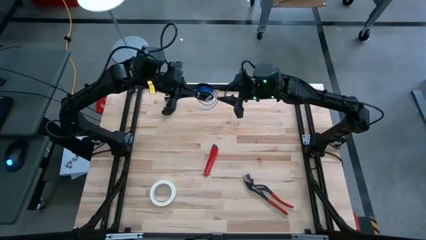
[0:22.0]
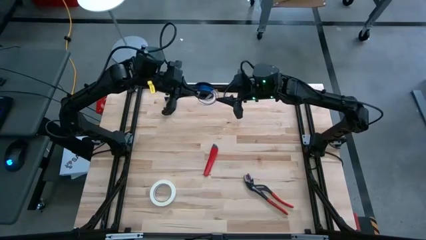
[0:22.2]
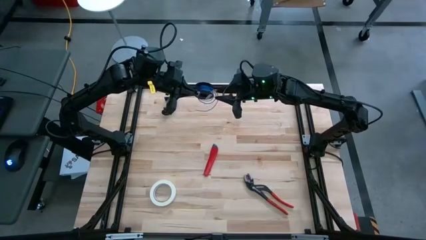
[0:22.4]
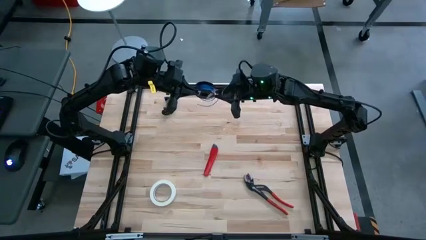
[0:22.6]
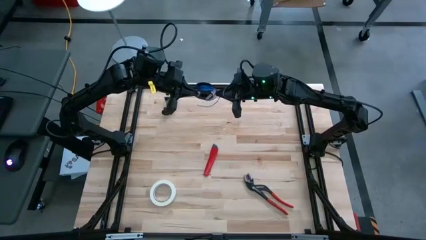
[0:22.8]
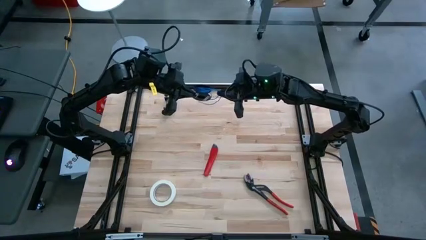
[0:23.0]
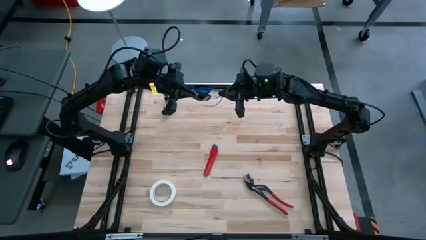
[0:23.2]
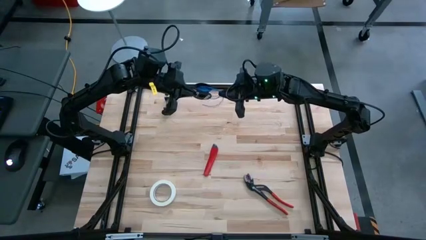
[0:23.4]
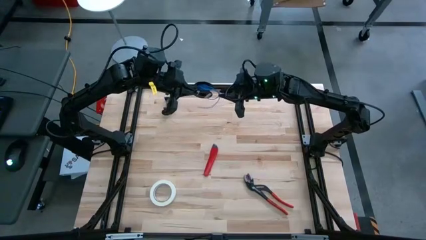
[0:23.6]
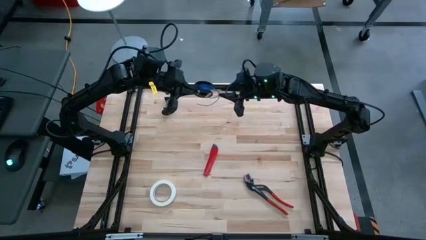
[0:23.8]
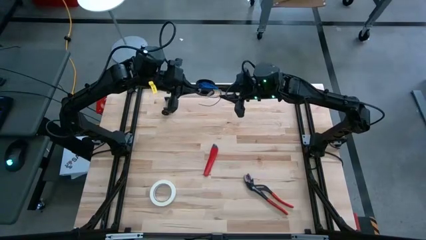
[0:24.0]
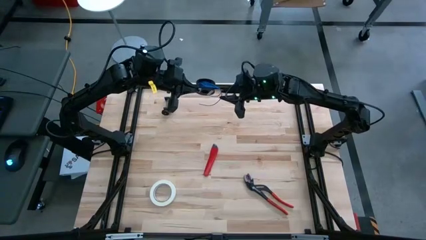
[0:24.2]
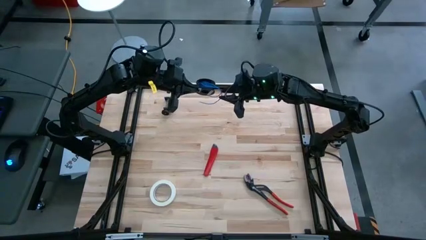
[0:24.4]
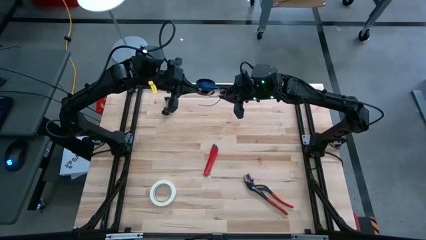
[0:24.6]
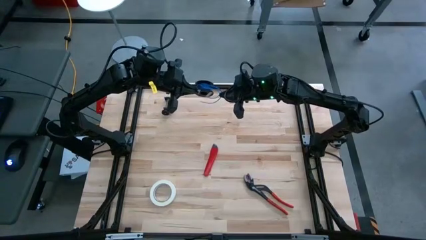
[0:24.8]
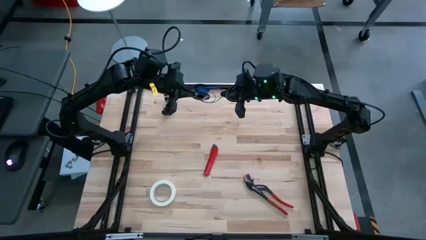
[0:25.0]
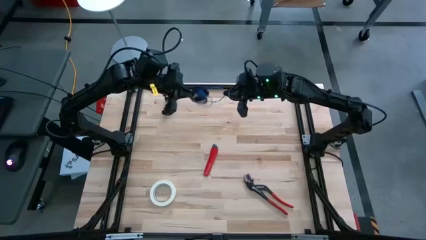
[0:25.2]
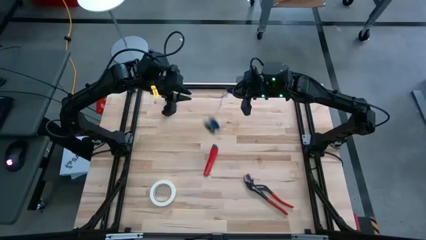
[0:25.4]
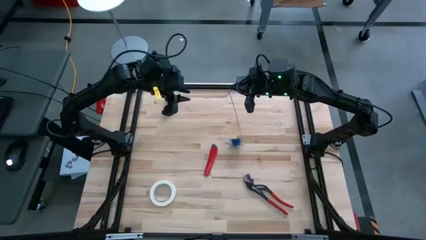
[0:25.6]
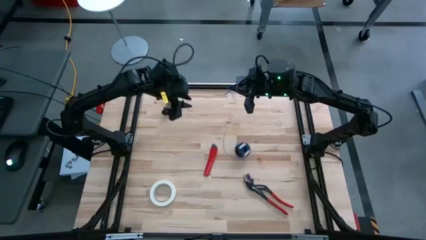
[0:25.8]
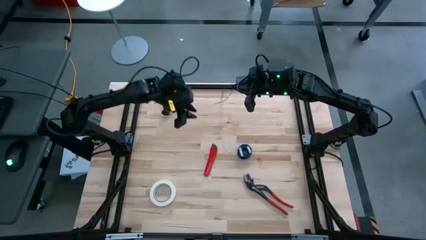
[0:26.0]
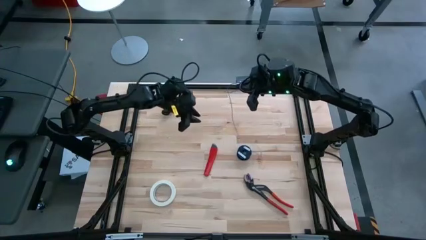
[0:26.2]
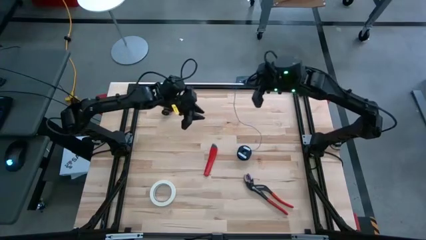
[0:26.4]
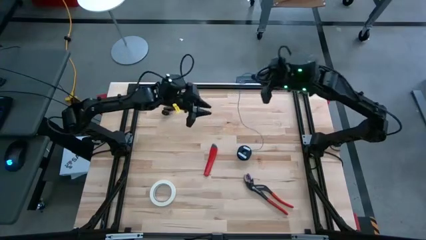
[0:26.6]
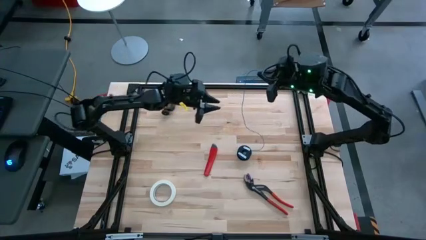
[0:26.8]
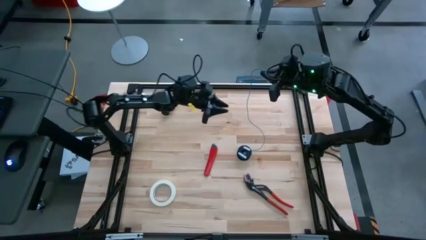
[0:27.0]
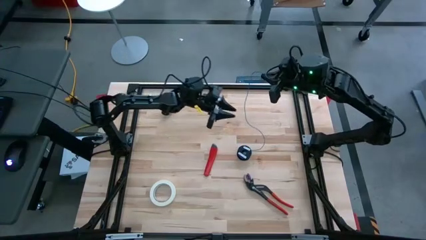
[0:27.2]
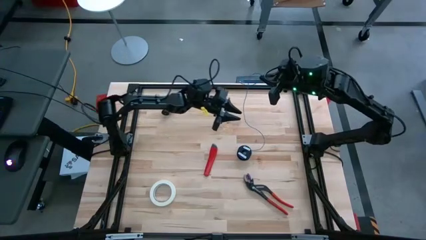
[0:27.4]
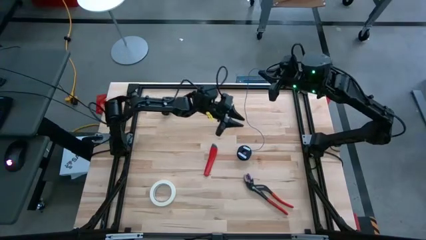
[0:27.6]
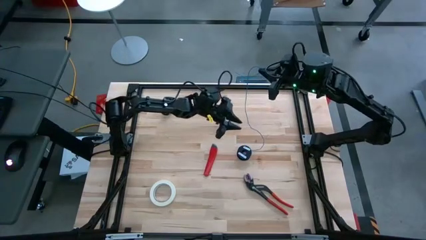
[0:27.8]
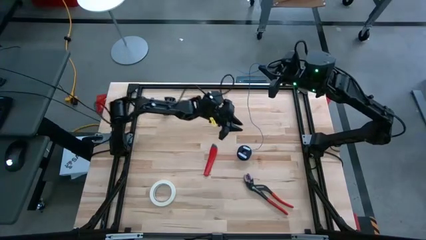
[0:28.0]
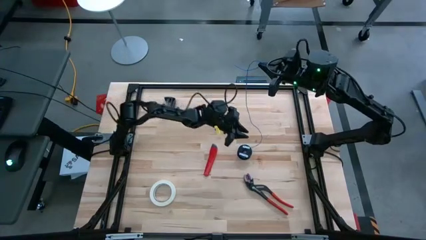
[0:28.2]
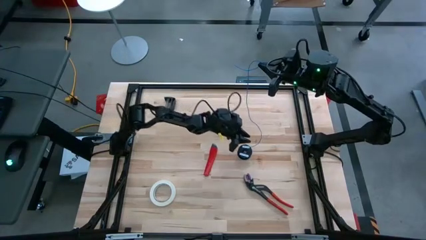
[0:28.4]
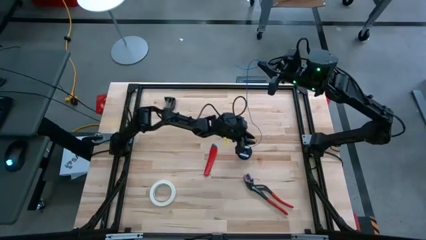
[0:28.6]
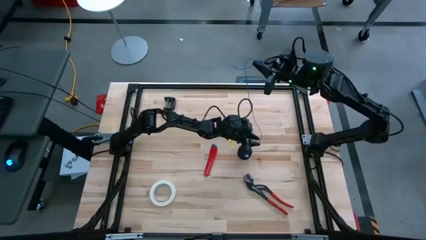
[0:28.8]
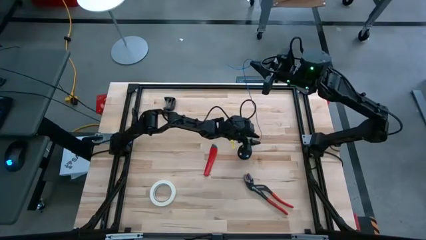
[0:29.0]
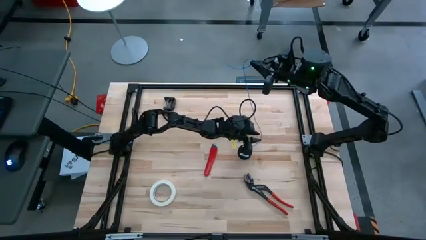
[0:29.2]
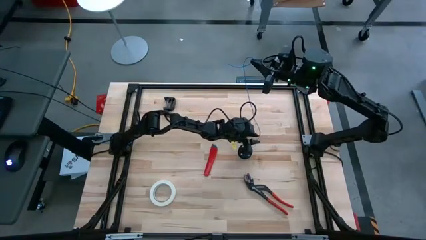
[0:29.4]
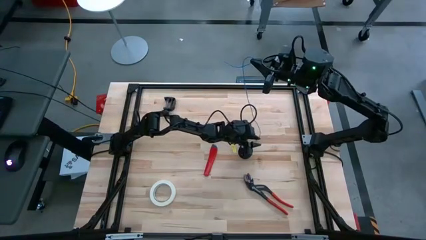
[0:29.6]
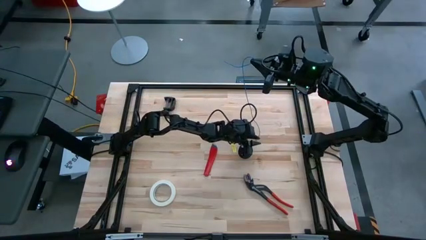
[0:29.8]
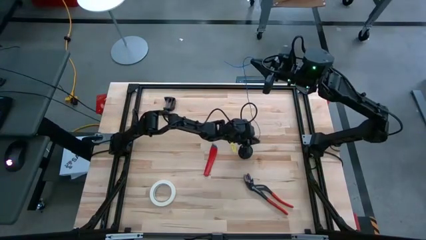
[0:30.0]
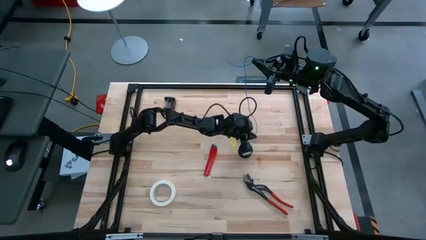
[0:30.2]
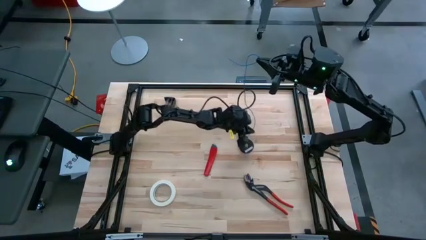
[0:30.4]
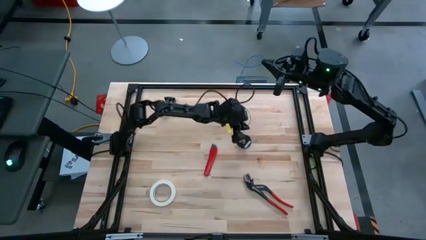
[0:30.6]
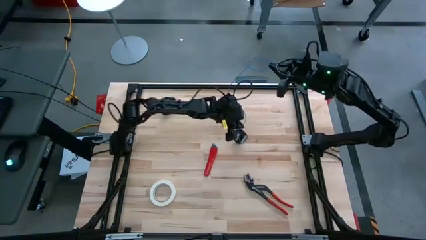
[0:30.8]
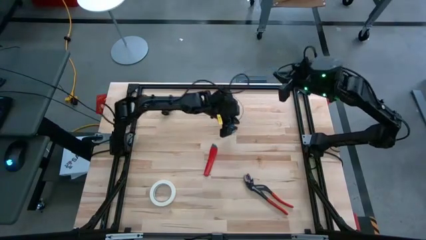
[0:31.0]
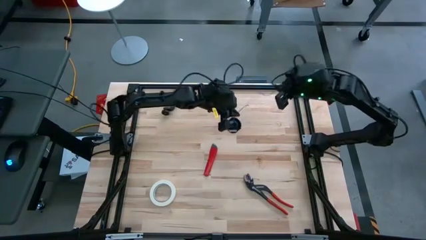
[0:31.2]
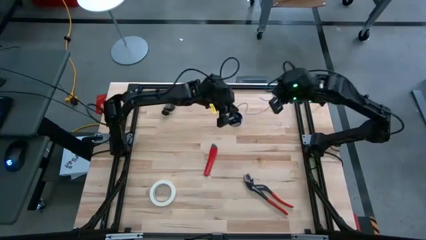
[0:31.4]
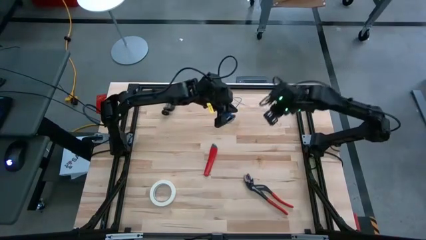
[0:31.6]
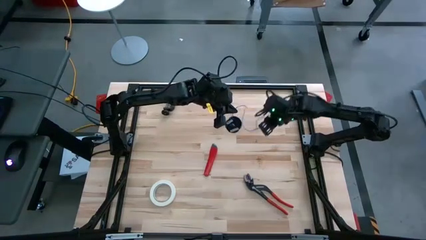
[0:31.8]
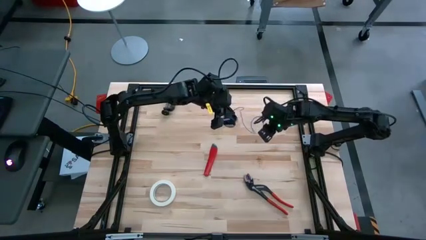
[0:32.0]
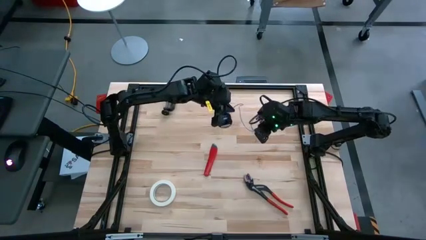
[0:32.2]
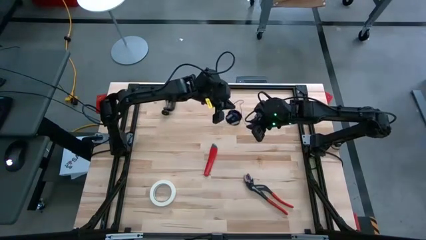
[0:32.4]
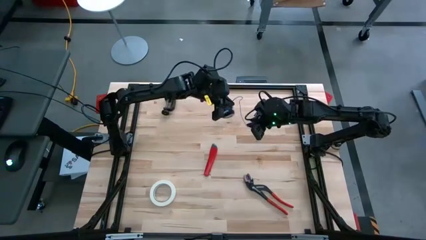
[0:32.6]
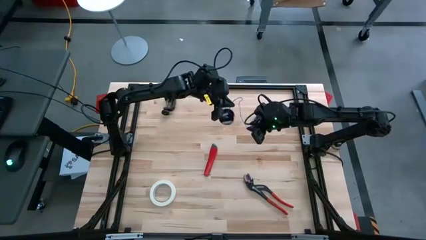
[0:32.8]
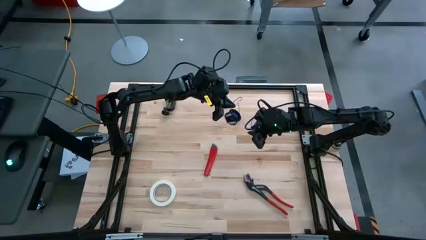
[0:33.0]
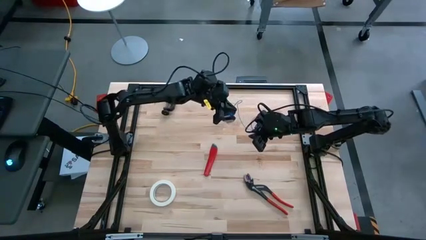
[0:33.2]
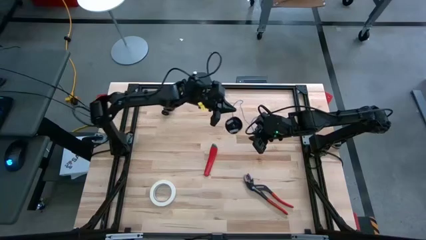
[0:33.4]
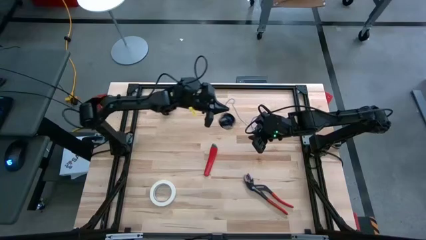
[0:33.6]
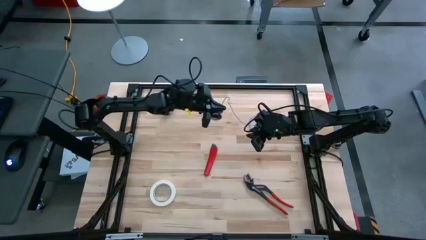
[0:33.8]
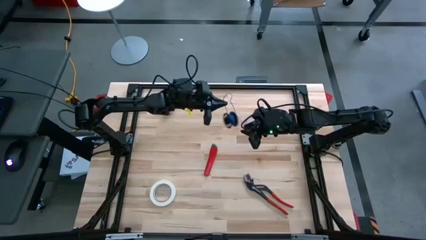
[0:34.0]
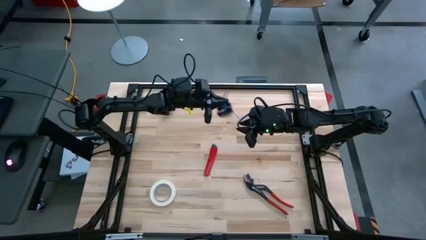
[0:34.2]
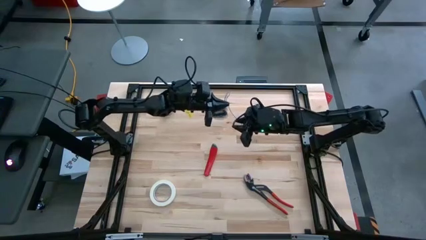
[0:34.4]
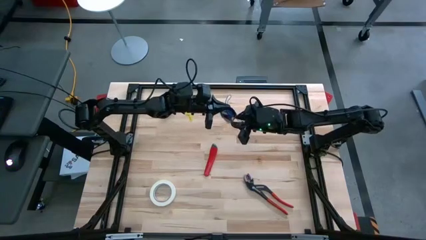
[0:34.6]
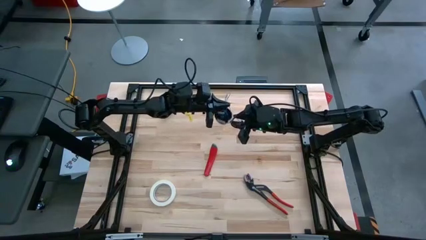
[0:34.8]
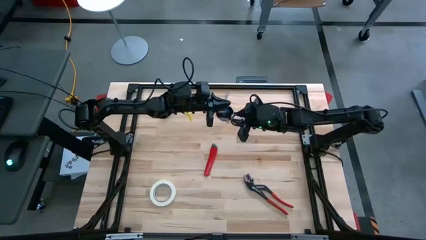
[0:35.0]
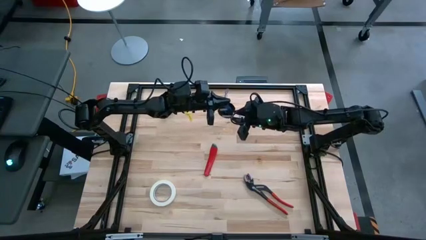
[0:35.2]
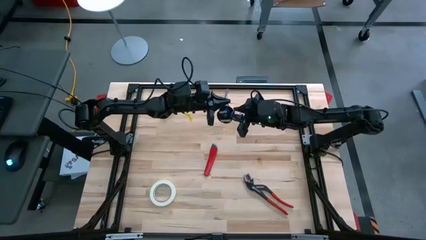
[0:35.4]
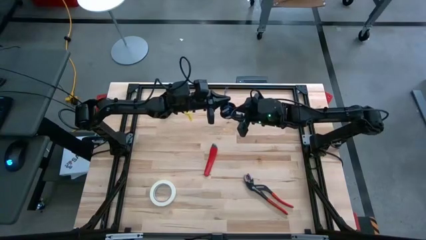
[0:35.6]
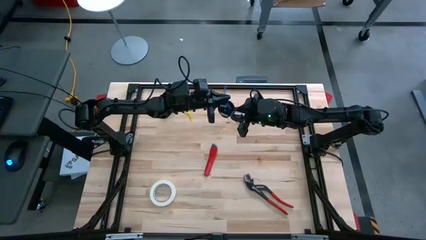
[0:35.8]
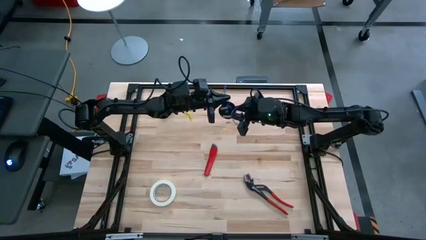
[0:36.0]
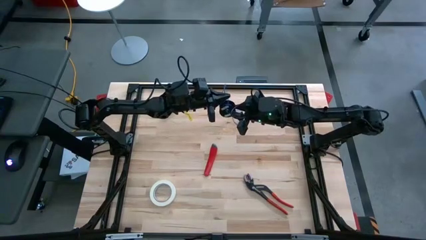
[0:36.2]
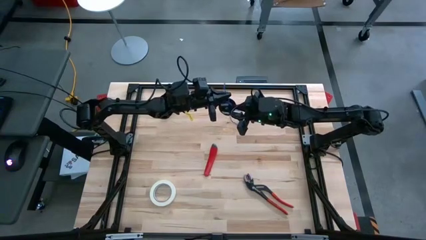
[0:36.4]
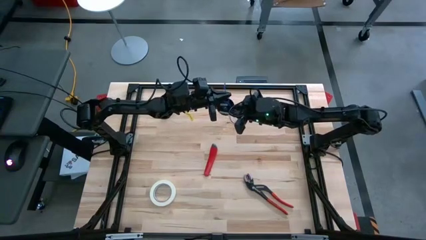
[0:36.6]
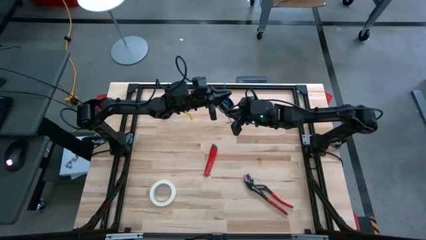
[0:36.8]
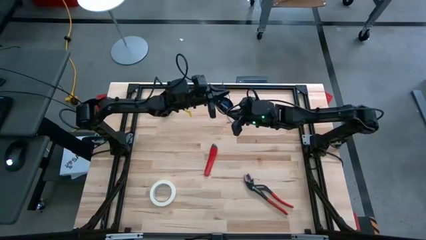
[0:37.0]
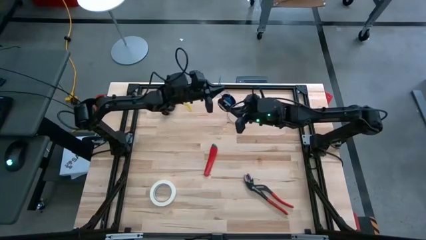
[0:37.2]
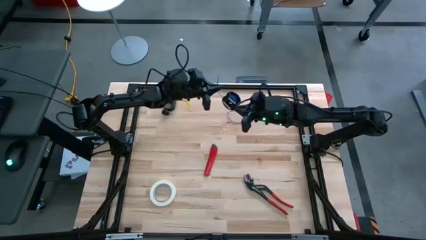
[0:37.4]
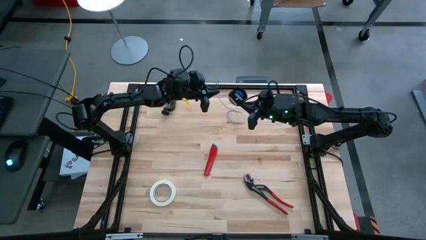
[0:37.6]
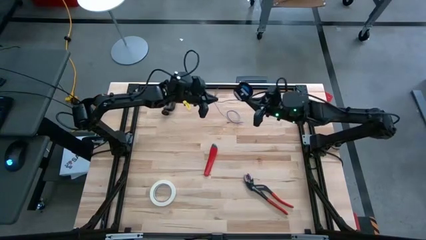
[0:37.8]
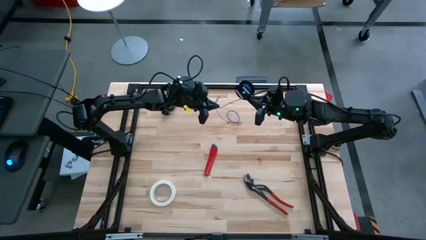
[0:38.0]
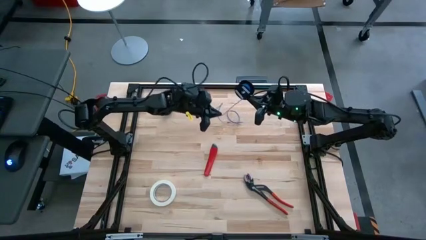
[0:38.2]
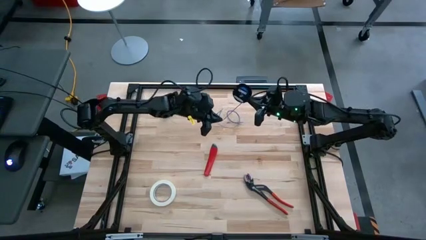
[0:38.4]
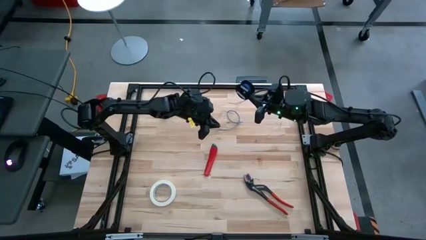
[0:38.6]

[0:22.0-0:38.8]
Task: Coil cords
Uncoil the blue wire cable from the black spool
